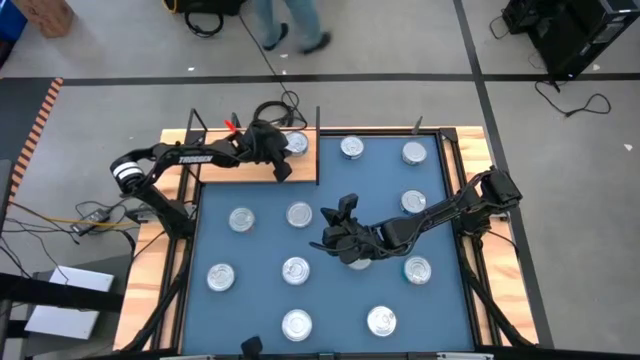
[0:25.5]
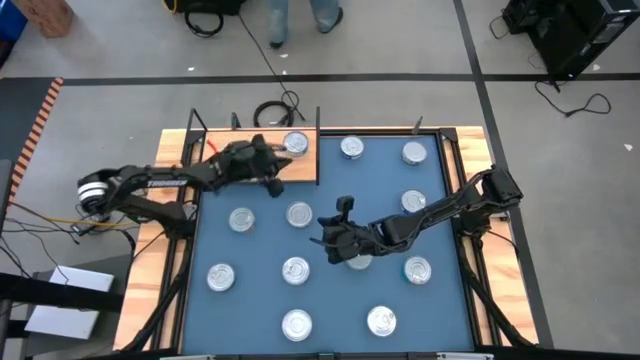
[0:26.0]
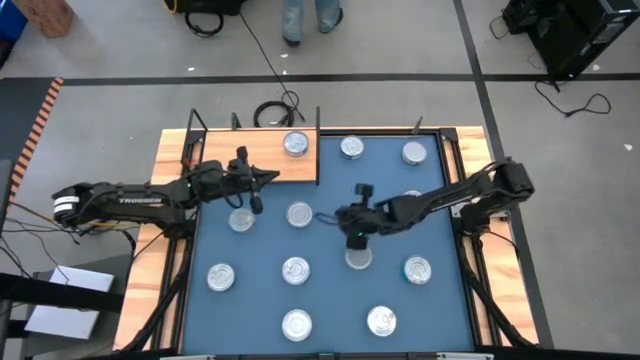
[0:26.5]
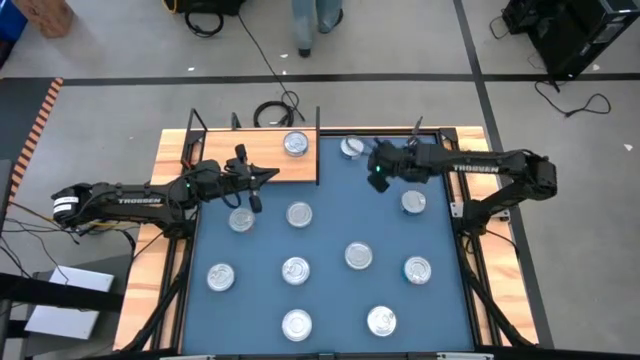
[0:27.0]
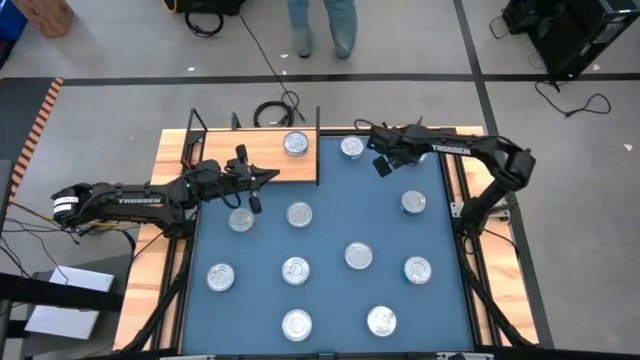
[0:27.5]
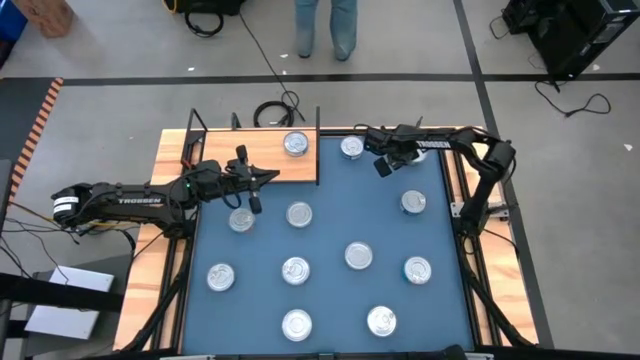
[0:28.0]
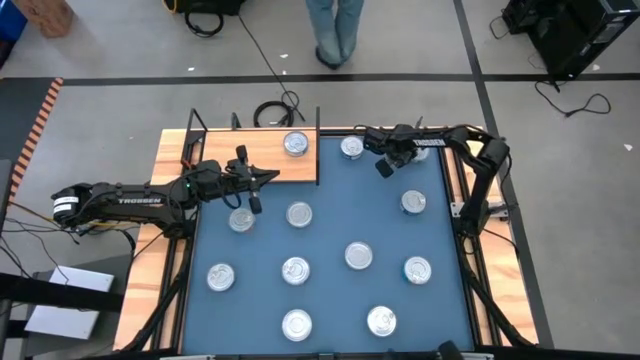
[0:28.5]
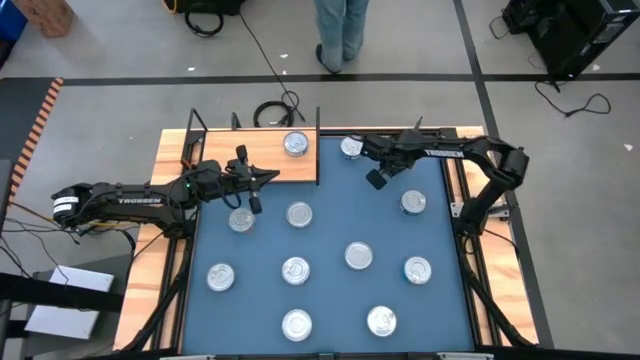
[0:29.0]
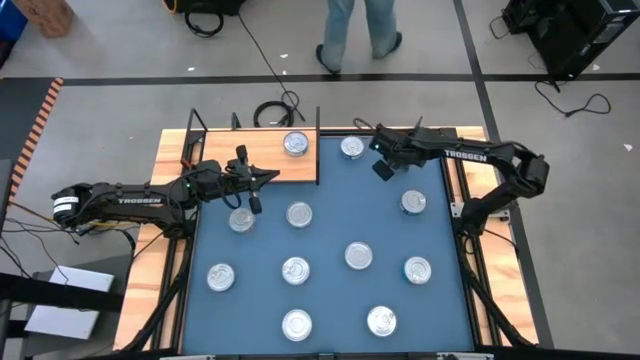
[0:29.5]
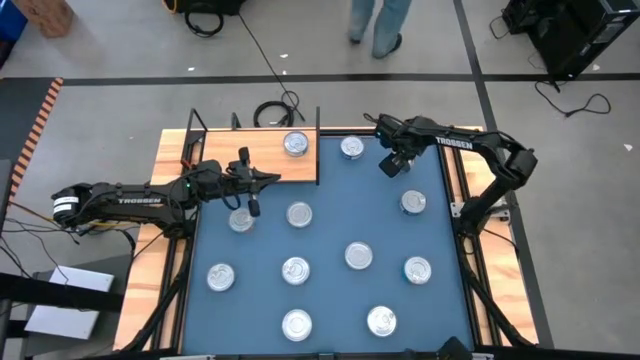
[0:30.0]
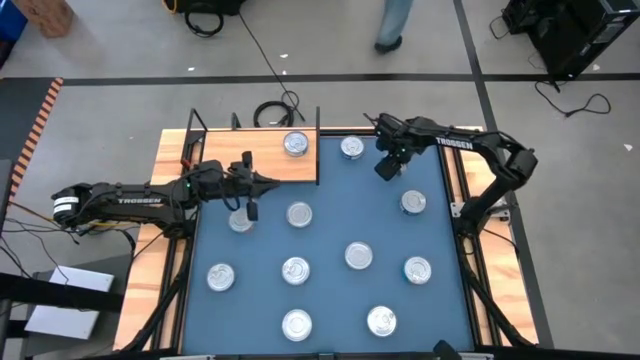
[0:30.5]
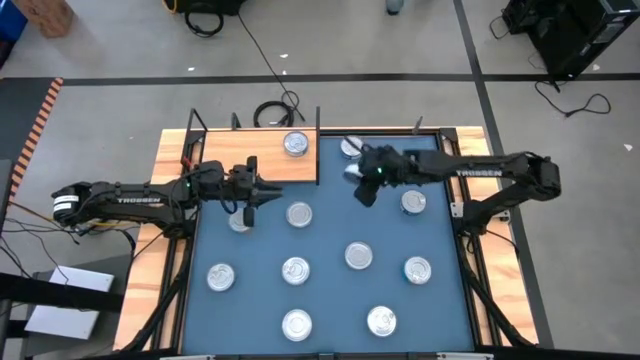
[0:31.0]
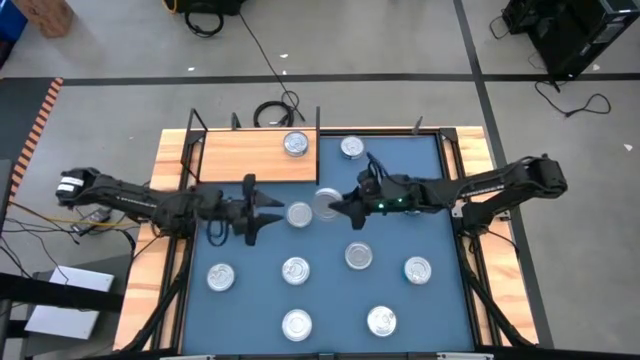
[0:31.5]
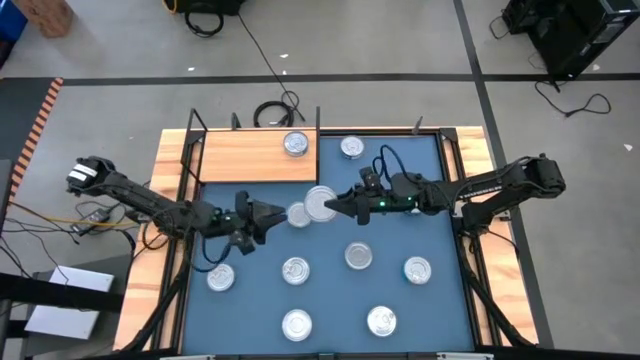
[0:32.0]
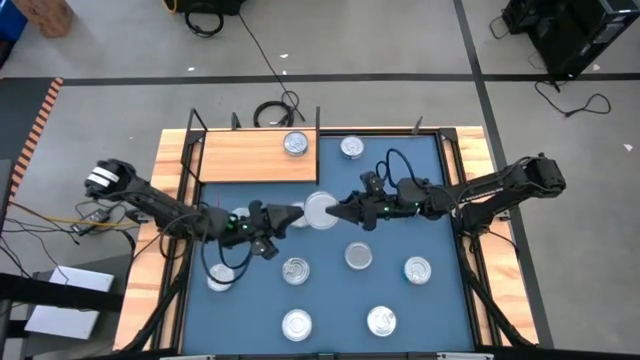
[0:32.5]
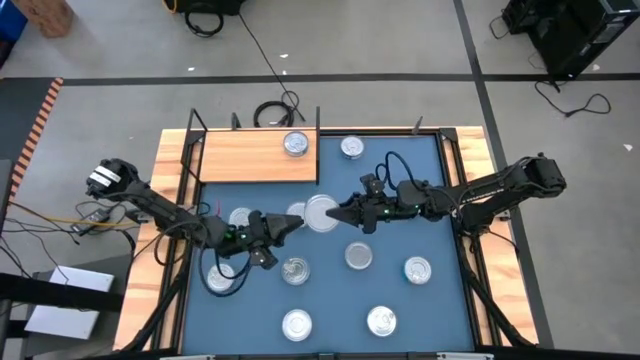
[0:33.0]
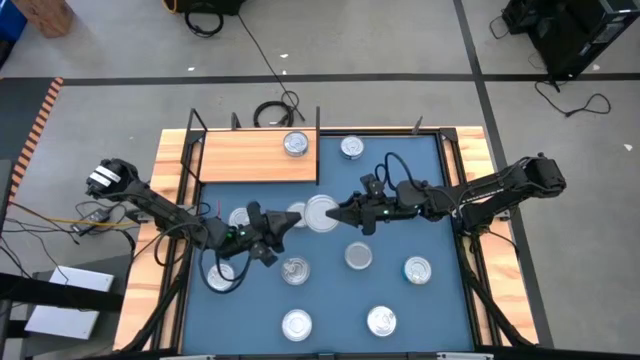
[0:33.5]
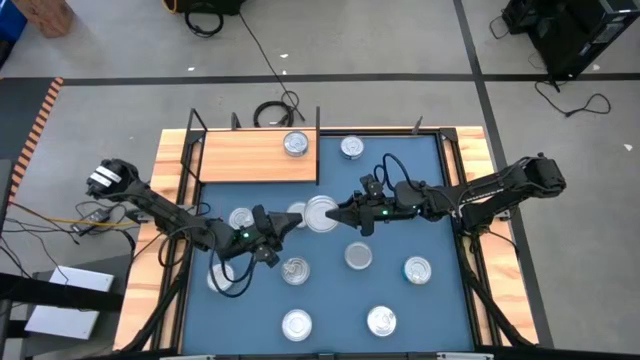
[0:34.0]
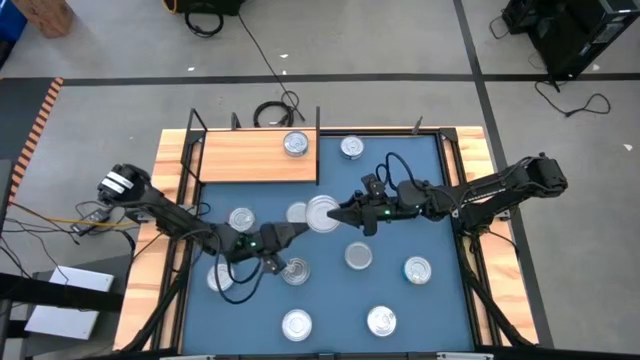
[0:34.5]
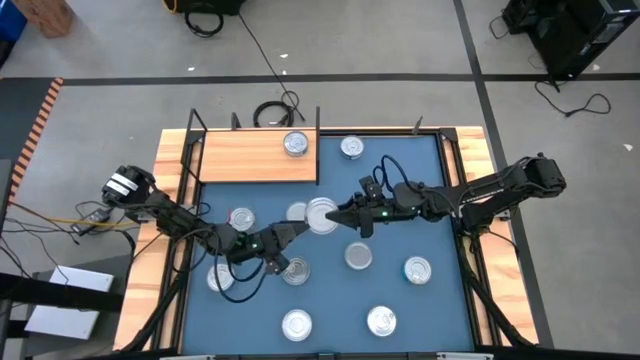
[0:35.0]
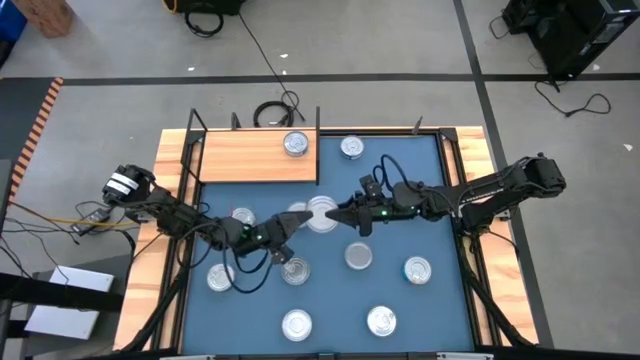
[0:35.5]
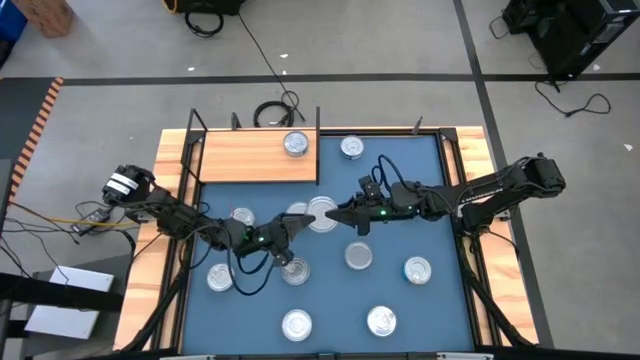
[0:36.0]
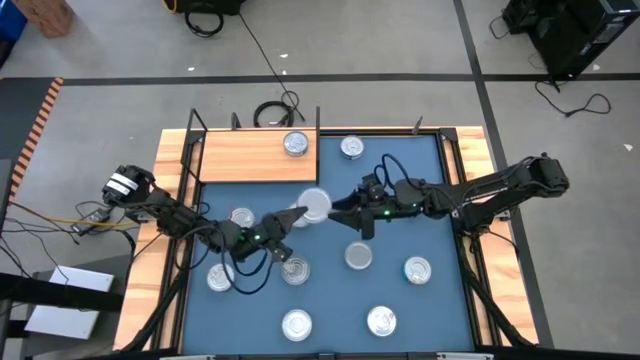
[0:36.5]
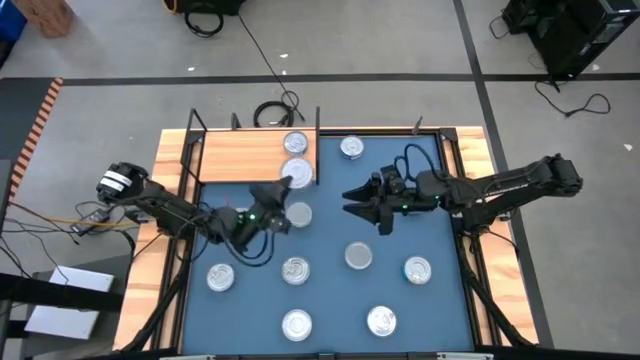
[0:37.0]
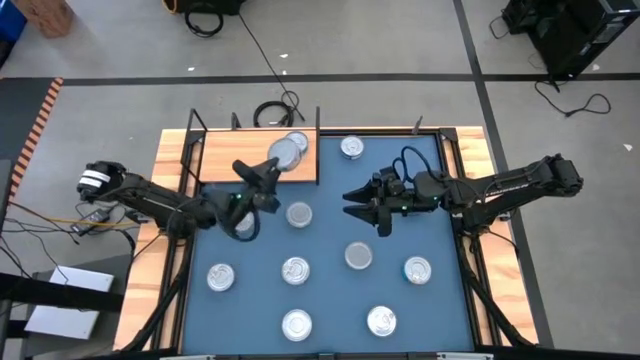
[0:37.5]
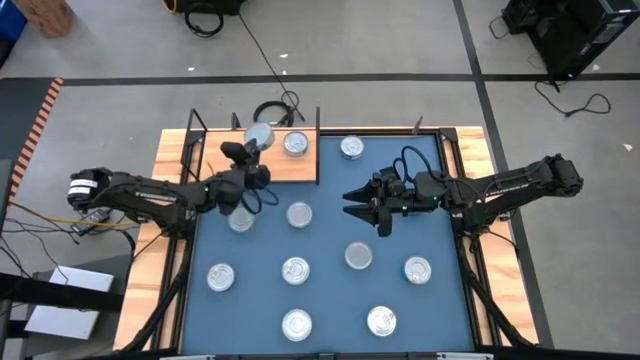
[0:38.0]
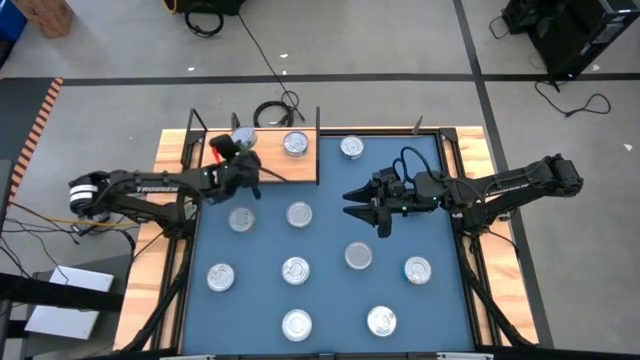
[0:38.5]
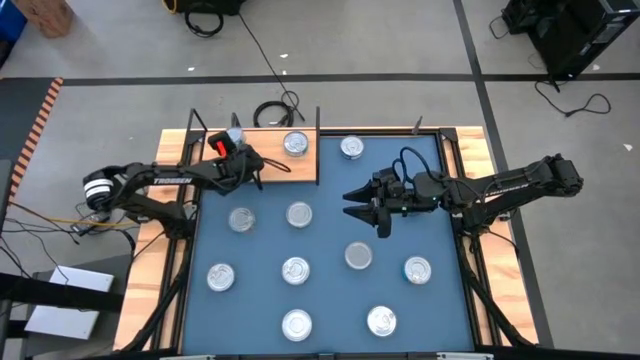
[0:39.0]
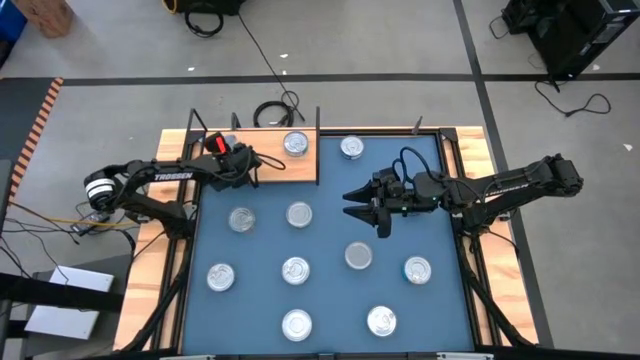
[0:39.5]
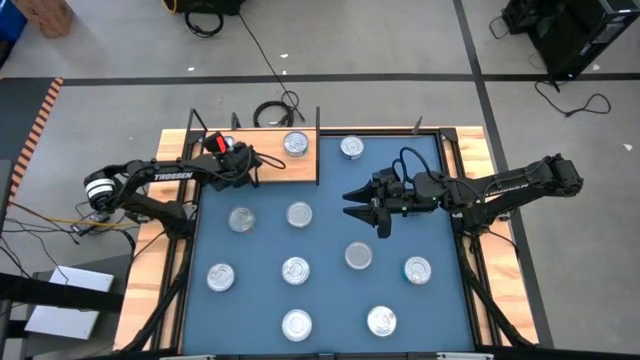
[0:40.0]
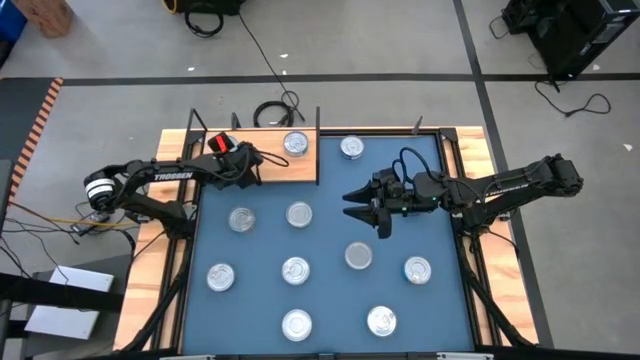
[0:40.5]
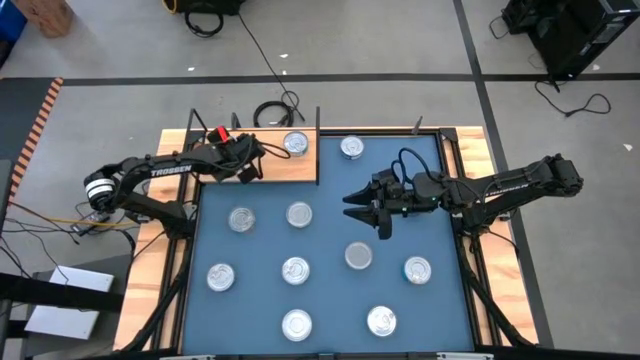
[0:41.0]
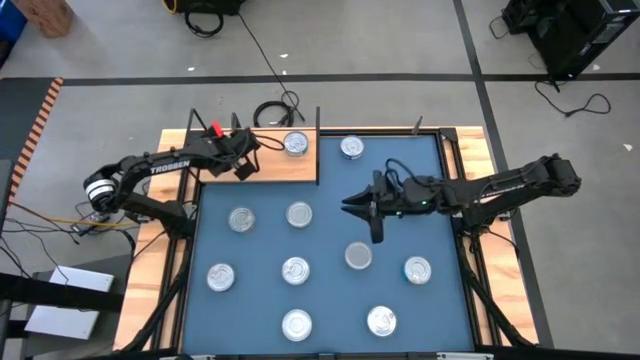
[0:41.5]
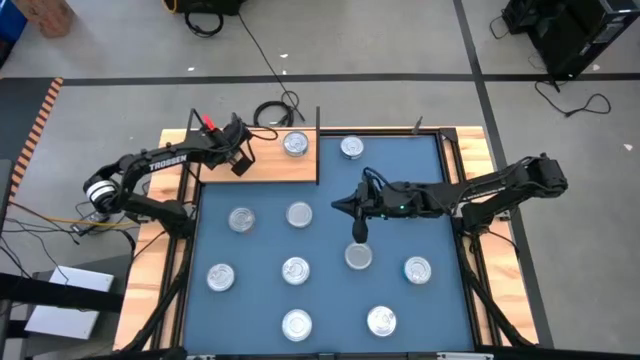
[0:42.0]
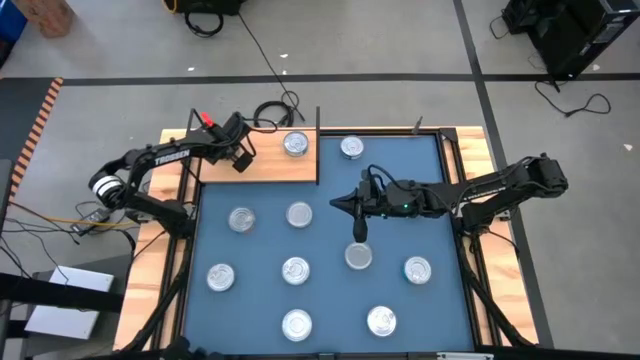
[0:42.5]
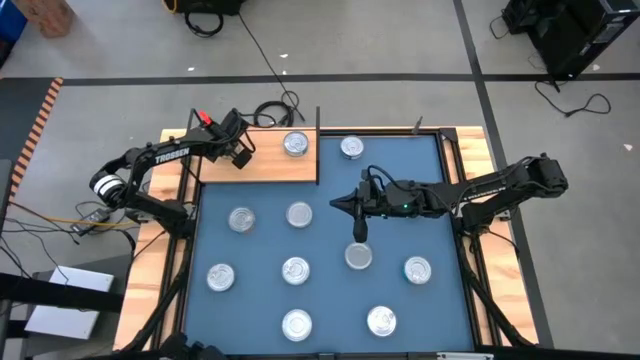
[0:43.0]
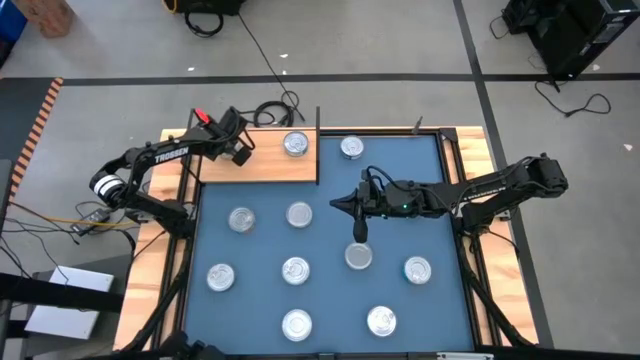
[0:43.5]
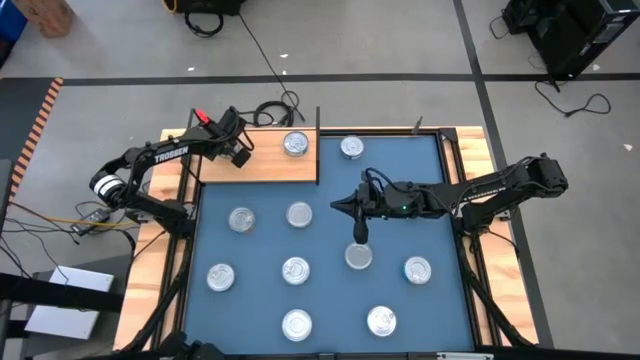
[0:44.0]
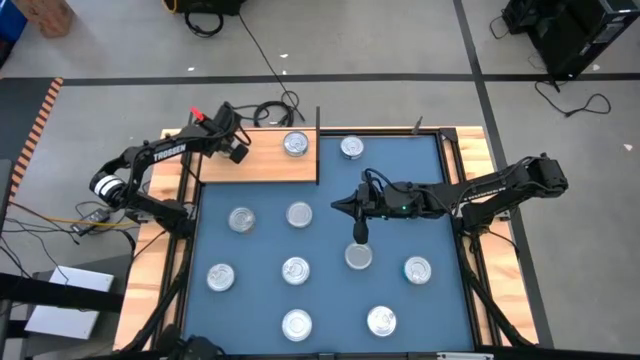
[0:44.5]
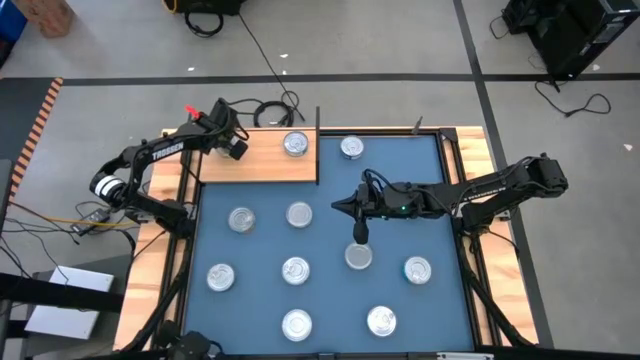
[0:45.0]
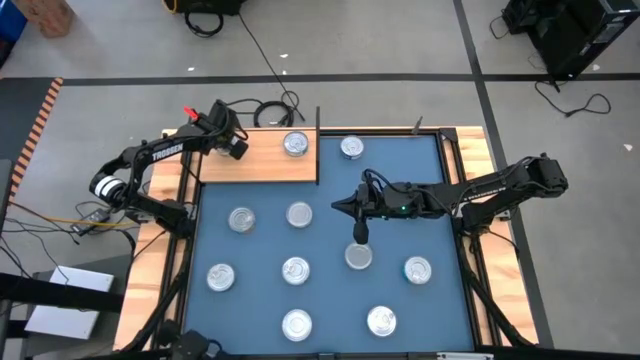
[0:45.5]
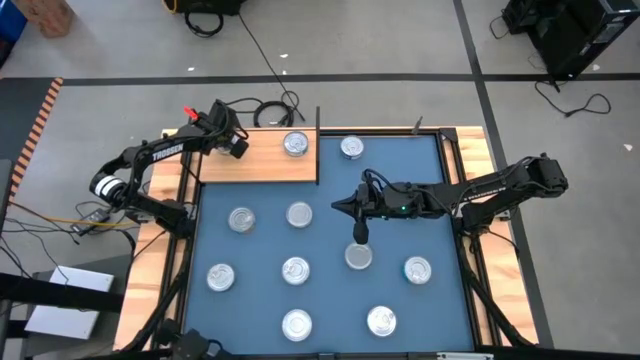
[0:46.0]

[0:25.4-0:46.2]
Task: Stack canned seafood by type on shelf
Put the green tuna can on the shelf
